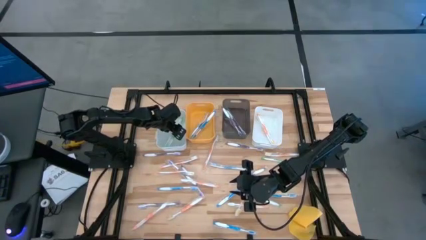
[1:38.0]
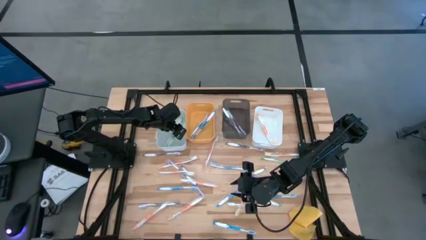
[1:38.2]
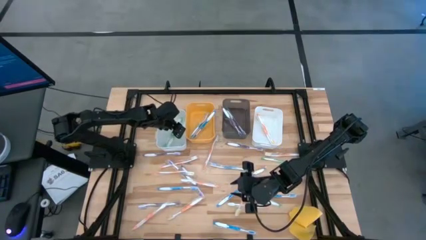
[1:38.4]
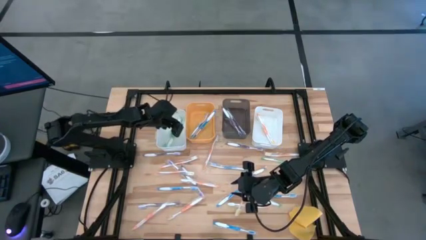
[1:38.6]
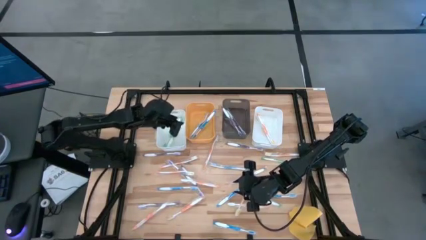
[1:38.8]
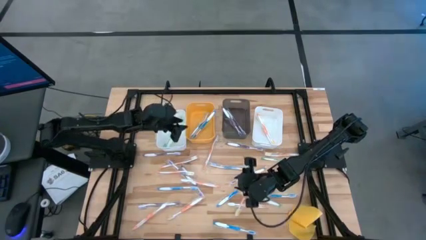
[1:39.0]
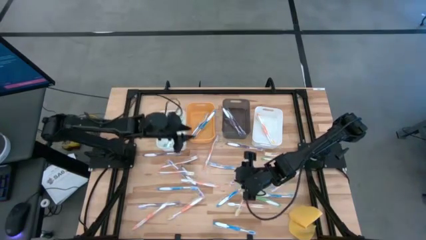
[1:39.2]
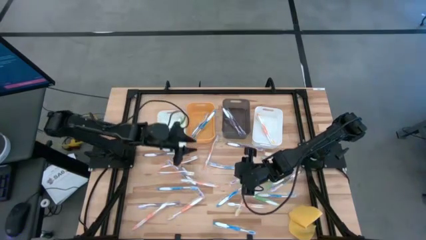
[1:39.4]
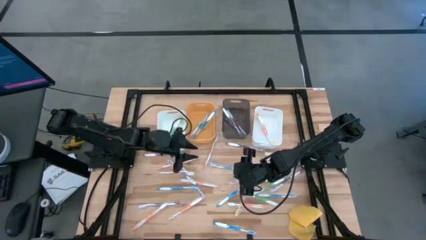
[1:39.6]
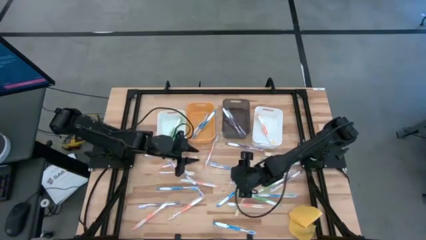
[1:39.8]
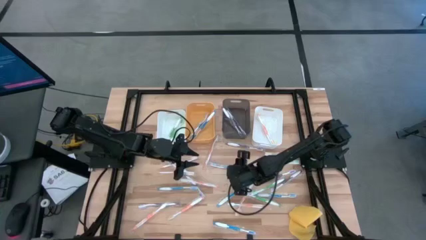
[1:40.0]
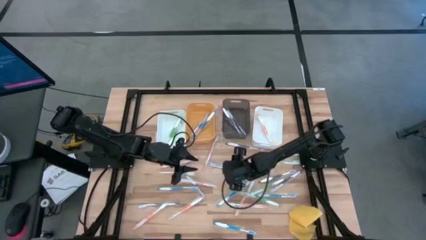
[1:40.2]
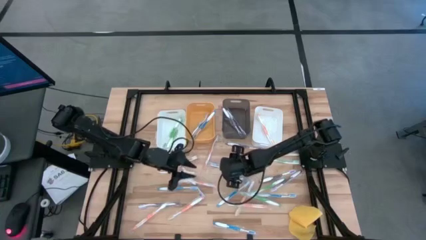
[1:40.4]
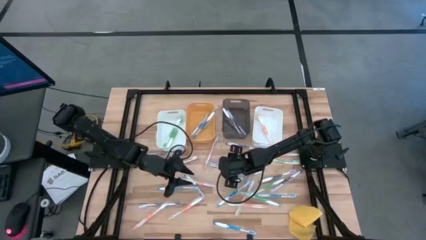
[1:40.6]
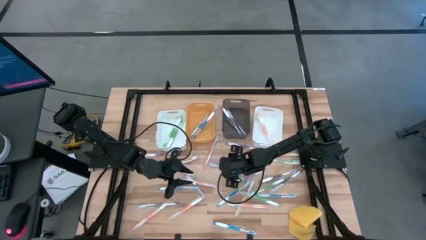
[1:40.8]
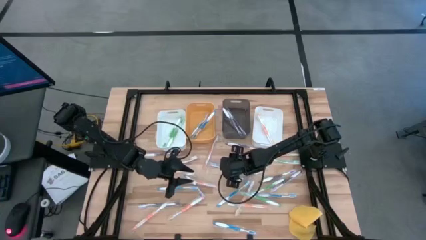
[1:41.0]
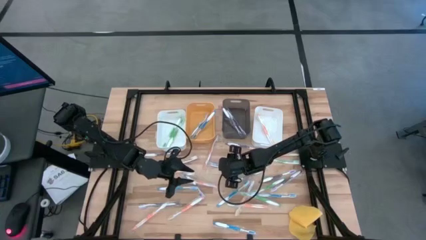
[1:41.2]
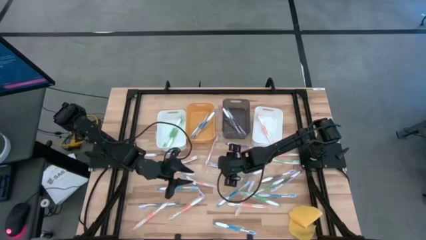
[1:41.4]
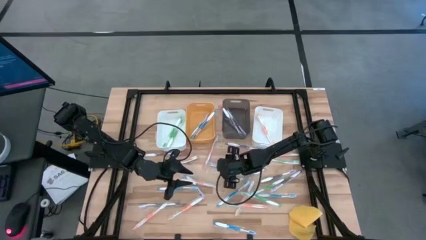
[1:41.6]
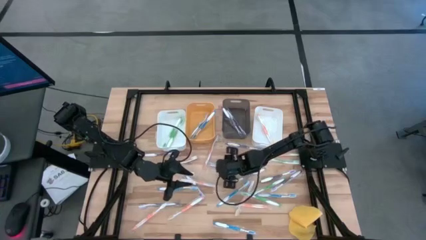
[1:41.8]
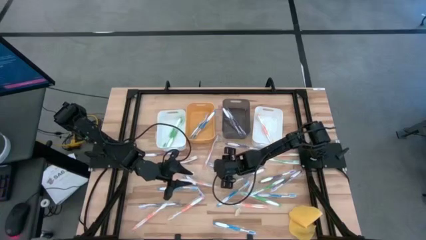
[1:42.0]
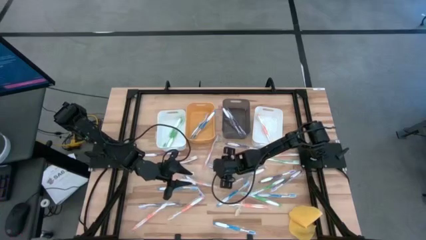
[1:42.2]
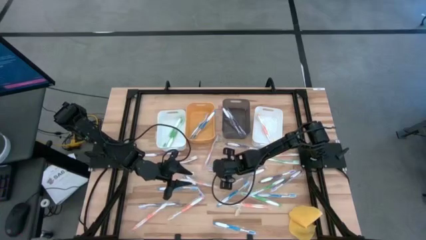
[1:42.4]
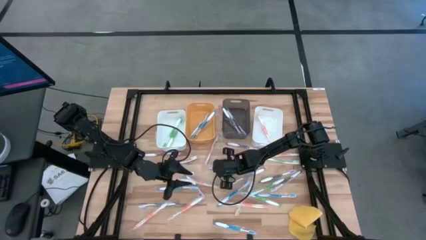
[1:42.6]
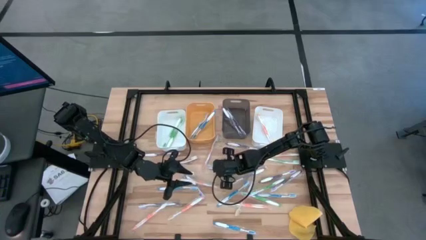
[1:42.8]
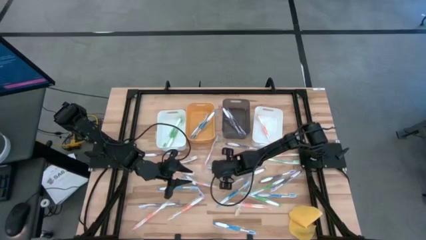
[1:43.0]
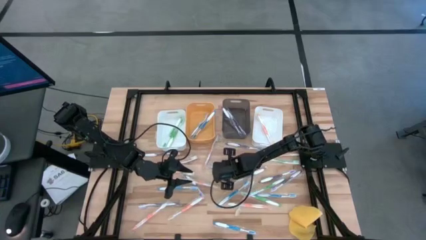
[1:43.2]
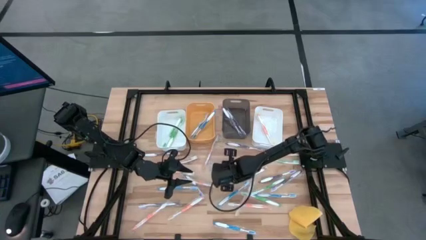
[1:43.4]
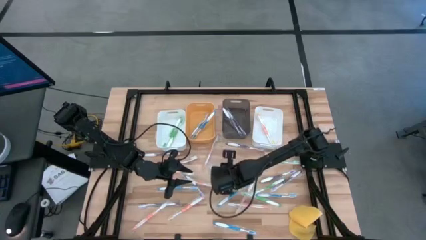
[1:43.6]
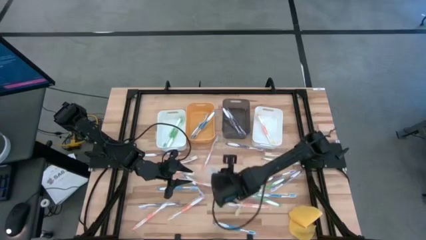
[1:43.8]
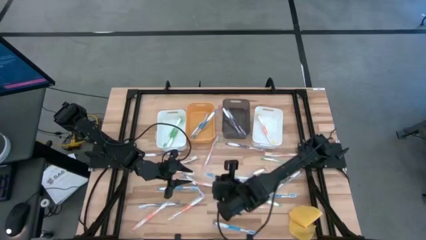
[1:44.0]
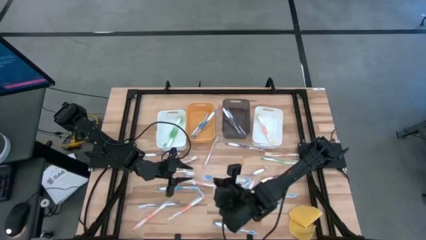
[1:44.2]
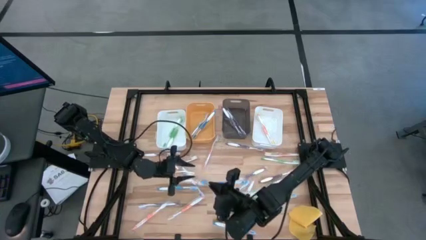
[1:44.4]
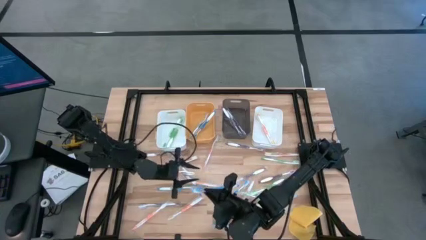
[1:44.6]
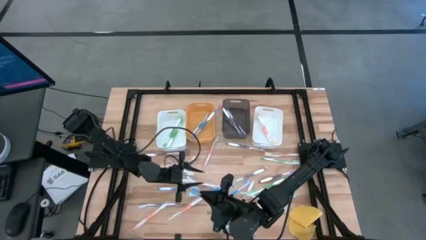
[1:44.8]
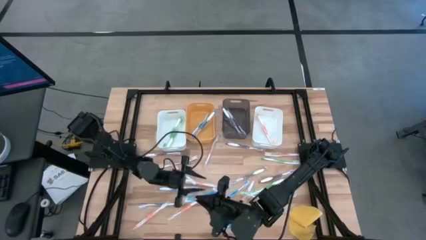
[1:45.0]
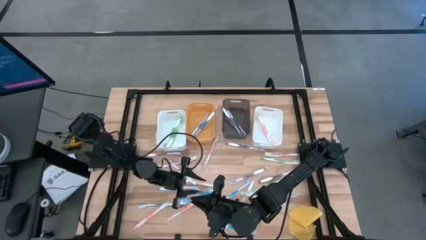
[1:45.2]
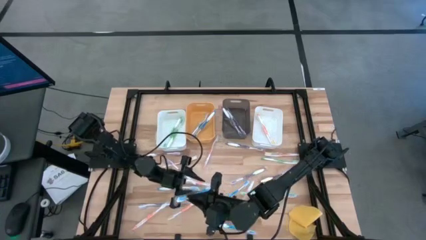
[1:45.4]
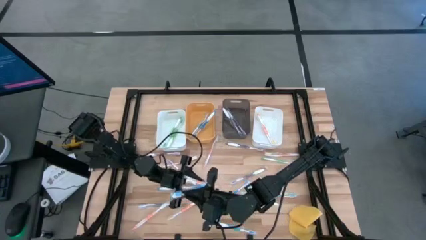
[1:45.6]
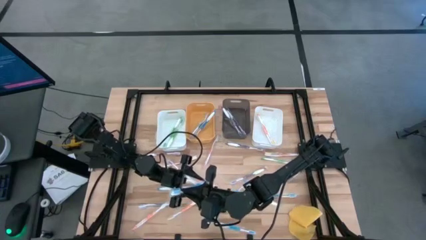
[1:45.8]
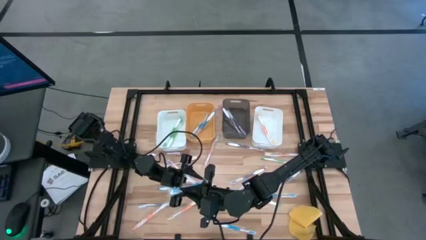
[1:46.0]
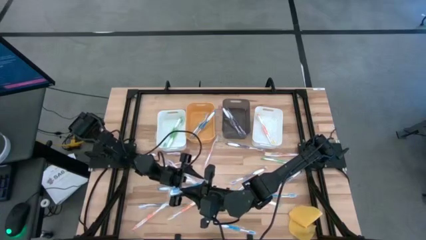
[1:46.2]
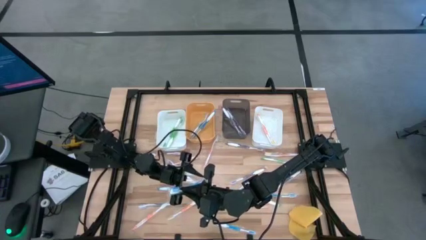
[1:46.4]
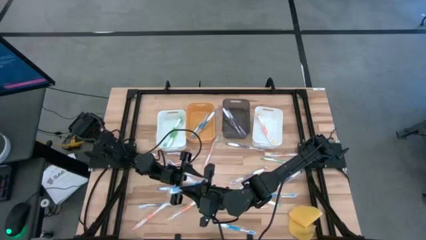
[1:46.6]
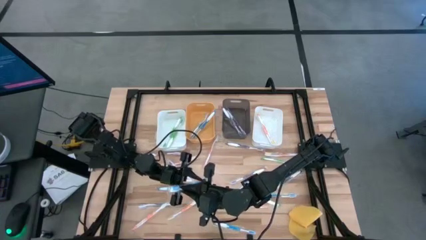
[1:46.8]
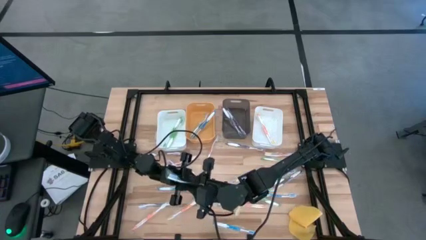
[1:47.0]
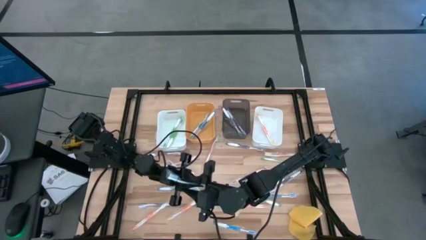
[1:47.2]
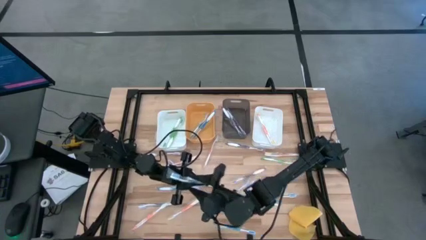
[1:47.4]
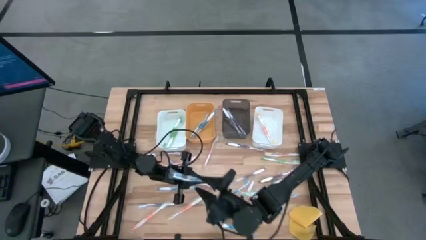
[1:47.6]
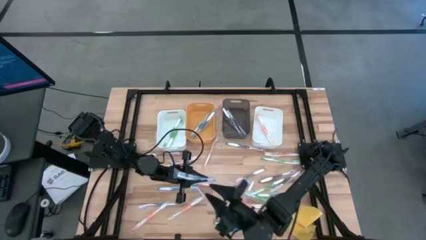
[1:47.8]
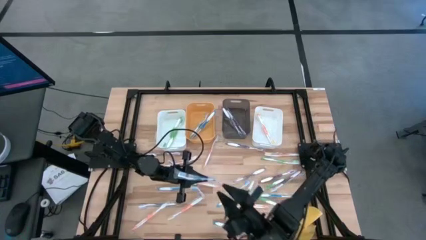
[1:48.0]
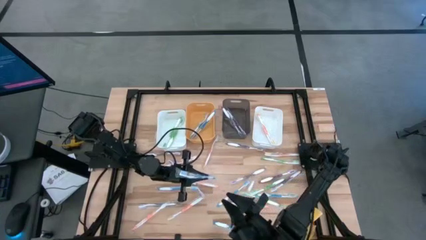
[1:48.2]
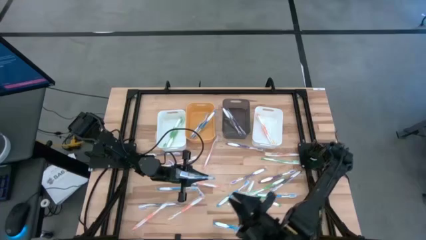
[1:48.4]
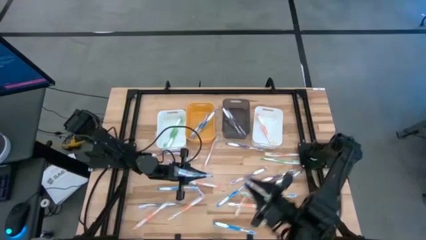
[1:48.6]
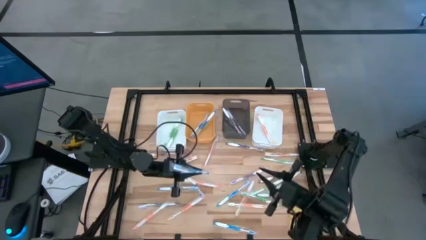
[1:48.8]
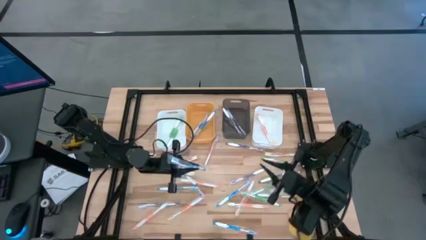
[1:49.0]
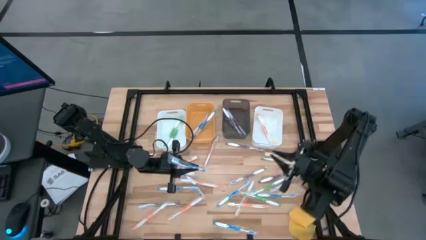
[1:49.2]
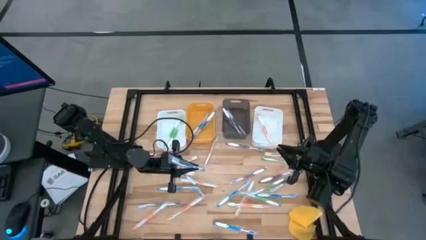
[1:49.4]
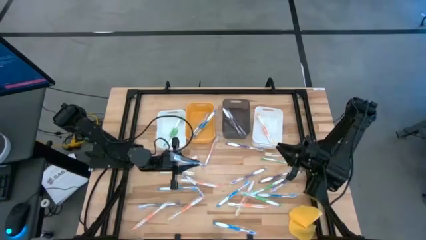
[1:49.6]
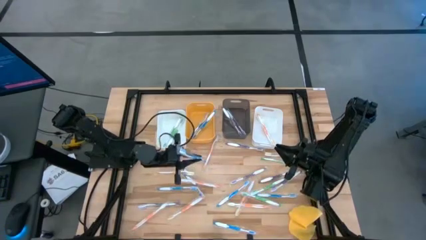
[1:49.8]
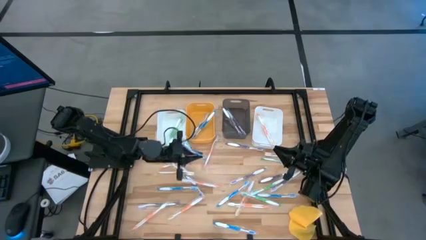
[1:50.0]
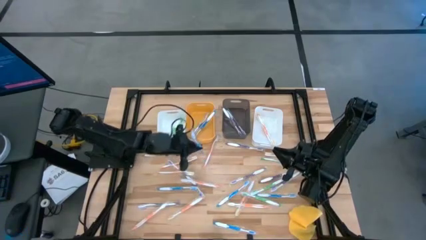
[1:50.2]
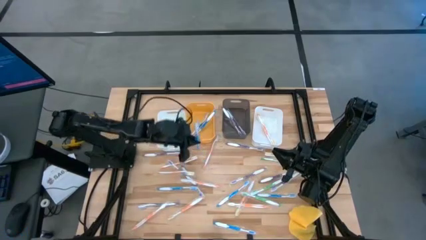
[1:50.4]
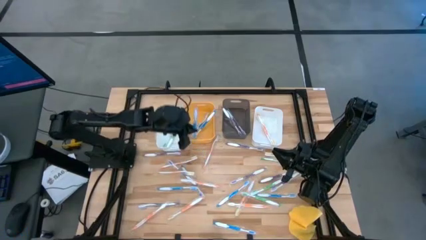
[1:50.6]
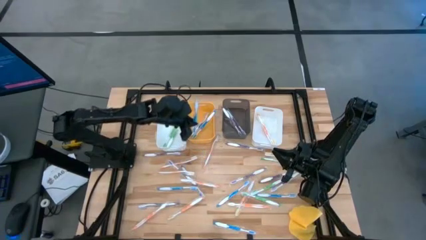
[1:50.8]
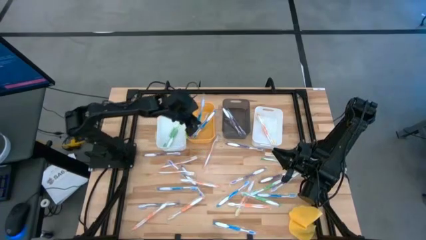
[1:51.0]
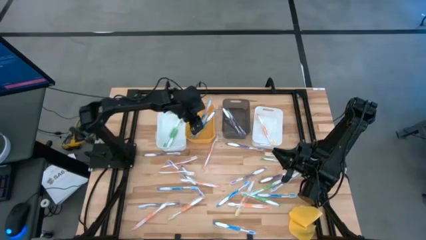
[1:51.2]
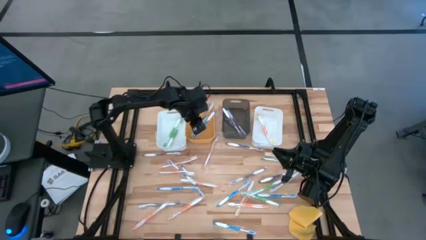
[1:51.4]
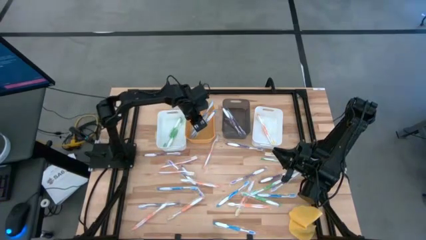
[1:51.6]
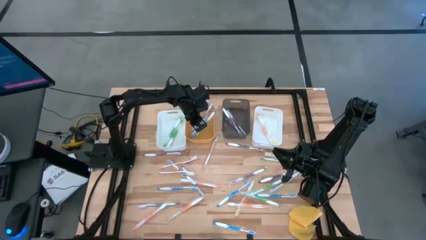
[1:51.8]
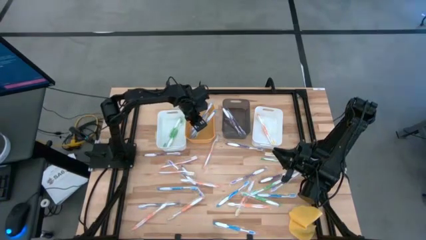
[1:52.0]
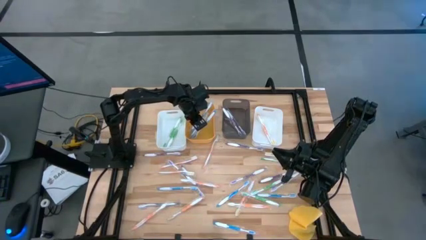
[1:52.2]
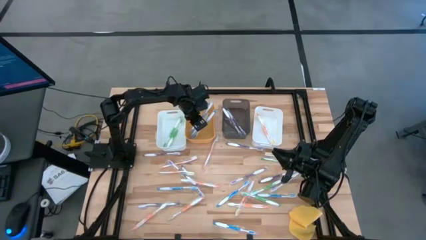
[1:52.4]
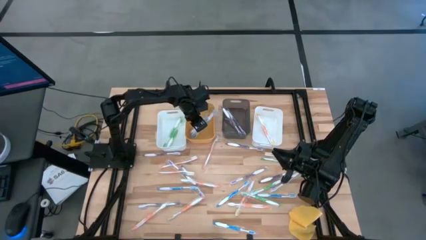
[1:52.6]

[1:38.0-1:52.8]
Task: Pick & Place Toothbrushes
Put the blue toothbrush into the orange bin

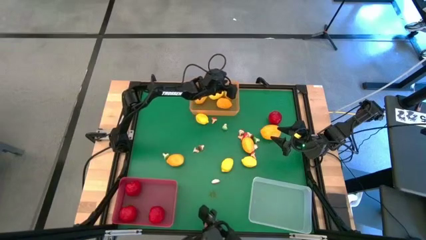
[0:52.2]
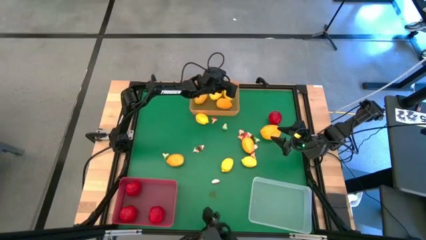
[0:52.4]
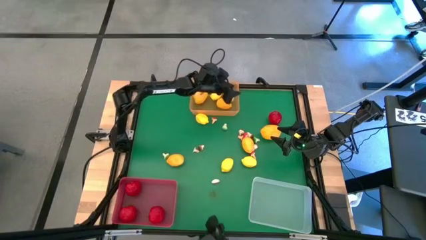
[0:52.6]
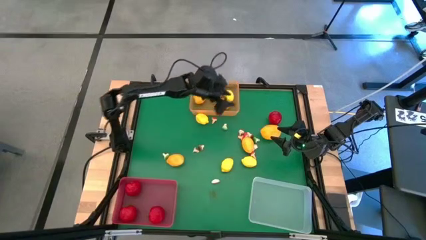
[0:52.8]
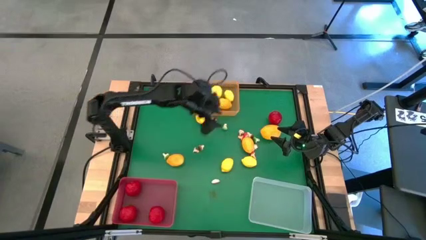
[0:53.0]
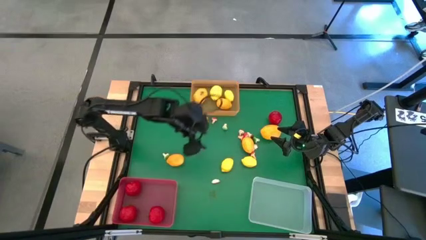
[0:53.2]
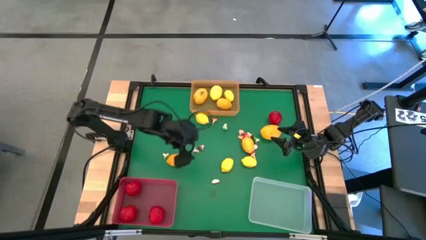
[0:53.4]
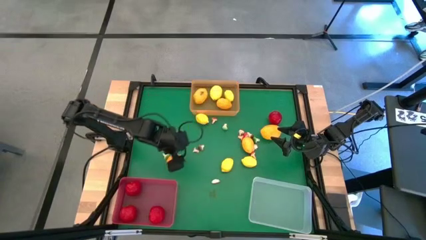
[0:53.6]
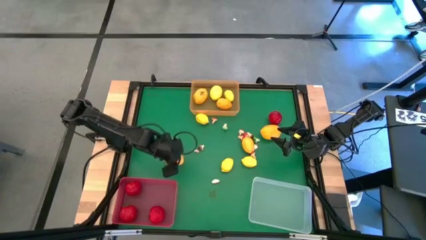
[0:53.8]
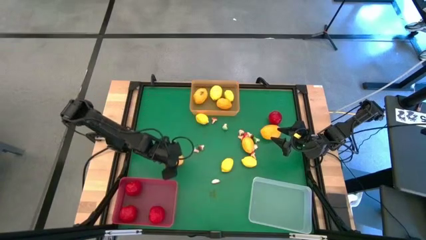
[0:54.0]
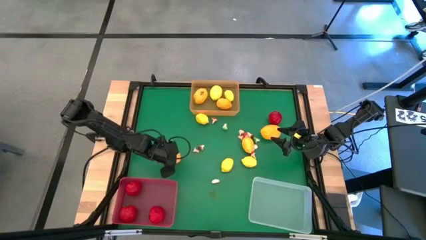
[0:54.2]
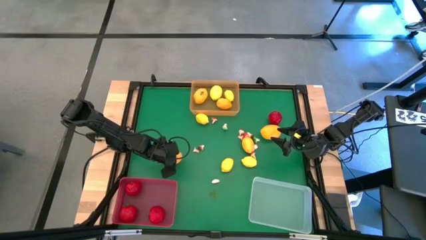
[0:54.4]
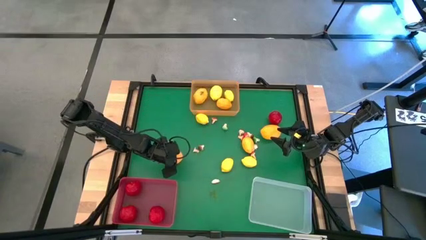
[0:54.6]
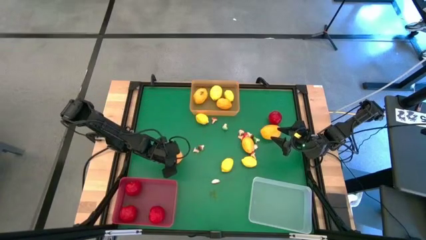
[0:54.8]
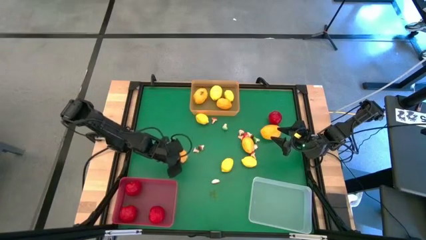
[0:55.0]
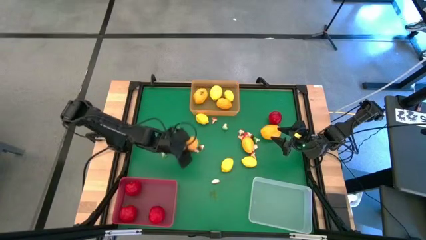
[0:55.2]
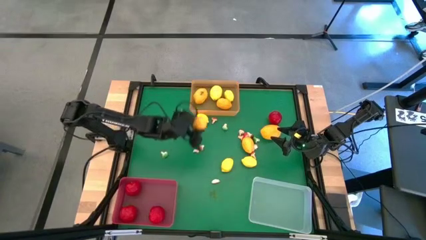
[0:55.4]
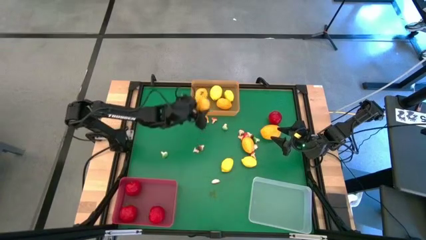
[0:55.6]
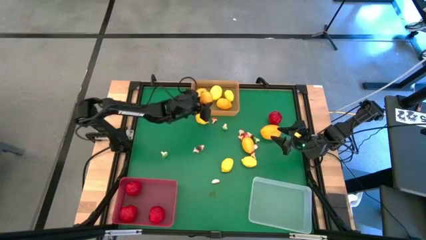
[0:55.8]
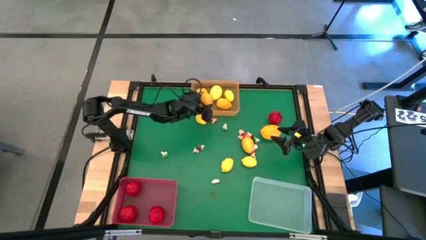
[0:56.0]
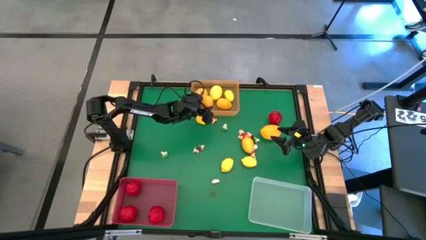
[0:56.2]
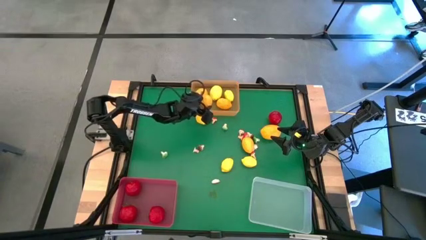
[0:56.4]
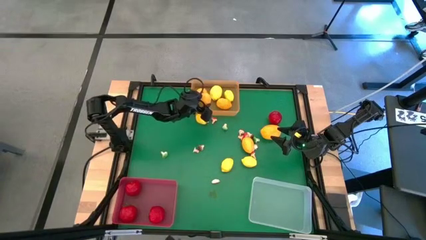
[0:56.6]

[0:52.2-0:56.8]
Task: Sort produce into baskets
Put the mango into the orange bin
